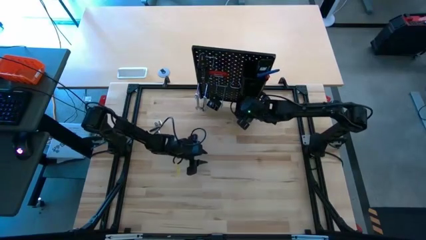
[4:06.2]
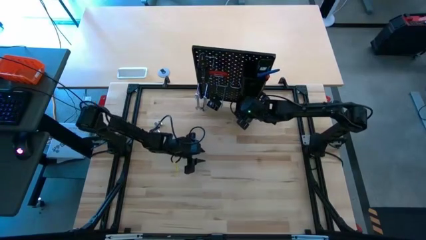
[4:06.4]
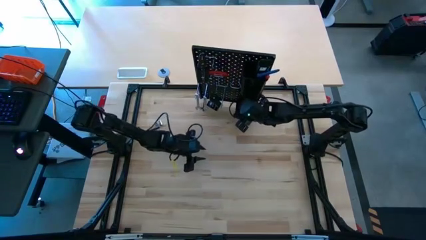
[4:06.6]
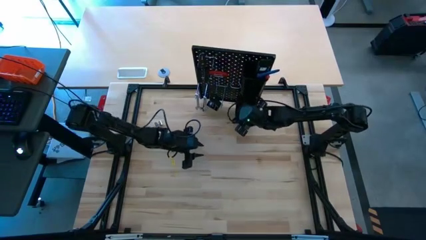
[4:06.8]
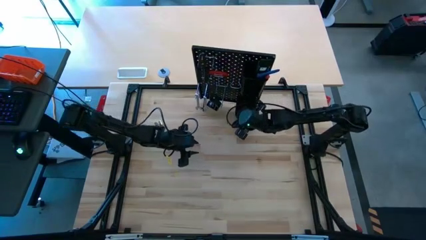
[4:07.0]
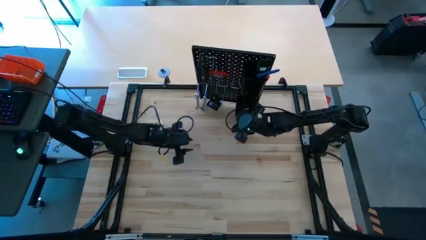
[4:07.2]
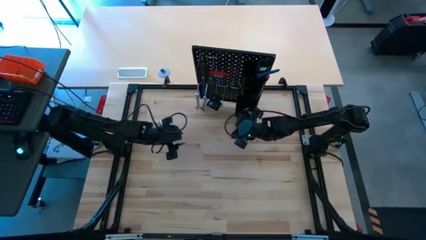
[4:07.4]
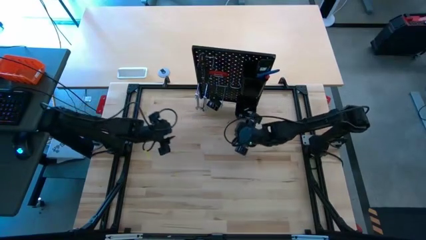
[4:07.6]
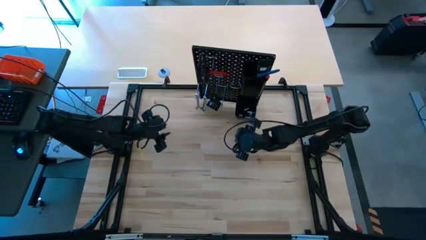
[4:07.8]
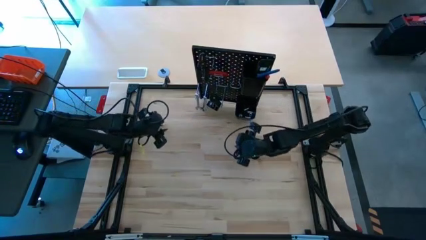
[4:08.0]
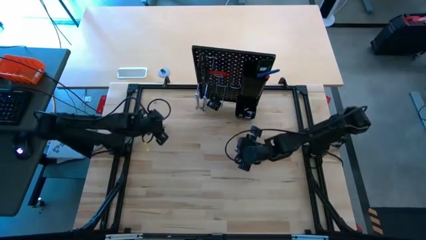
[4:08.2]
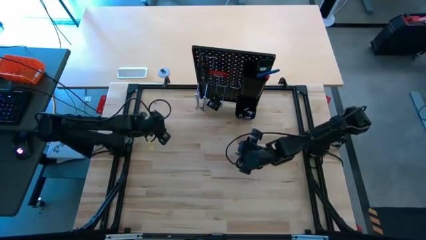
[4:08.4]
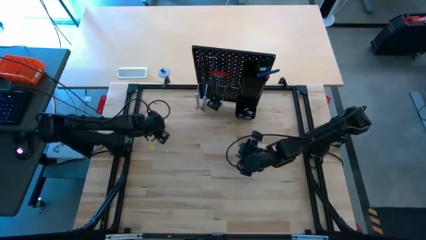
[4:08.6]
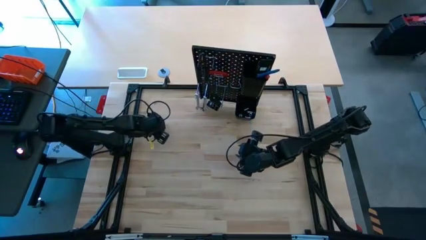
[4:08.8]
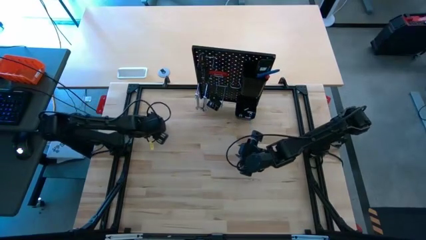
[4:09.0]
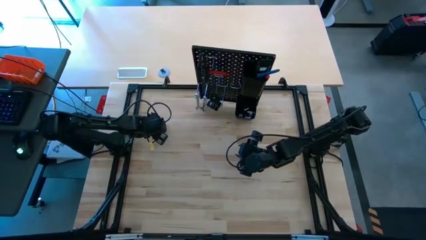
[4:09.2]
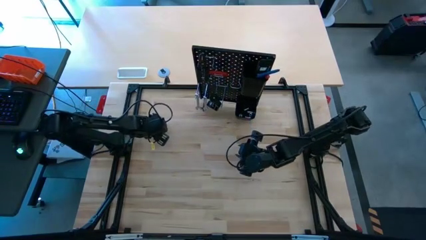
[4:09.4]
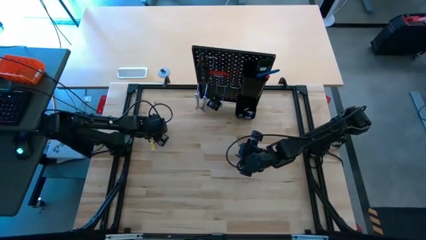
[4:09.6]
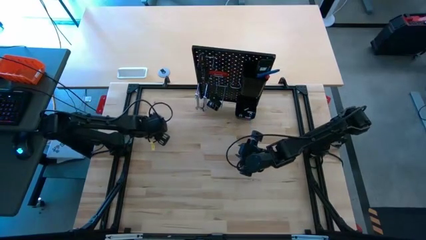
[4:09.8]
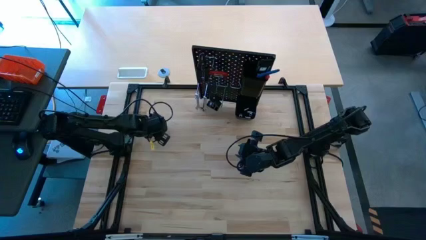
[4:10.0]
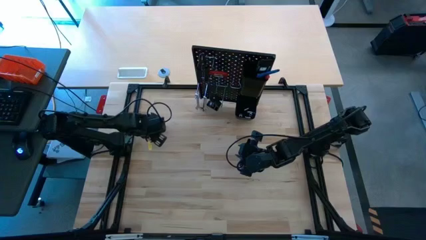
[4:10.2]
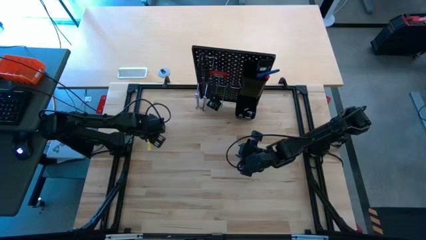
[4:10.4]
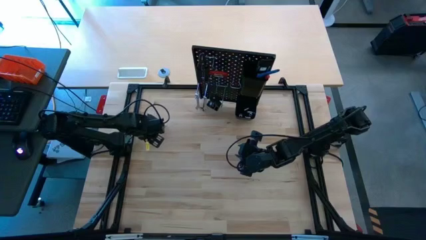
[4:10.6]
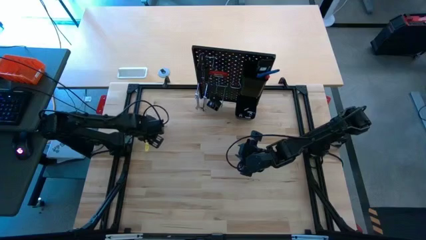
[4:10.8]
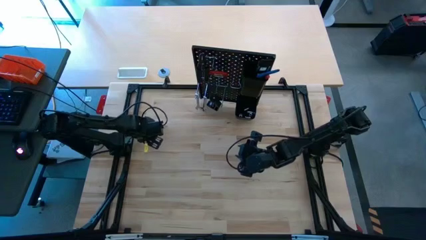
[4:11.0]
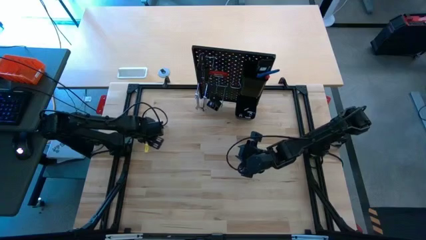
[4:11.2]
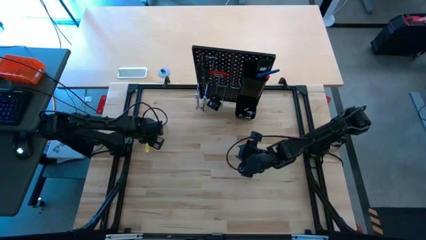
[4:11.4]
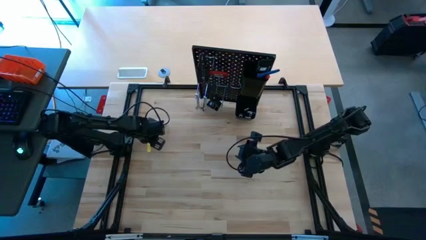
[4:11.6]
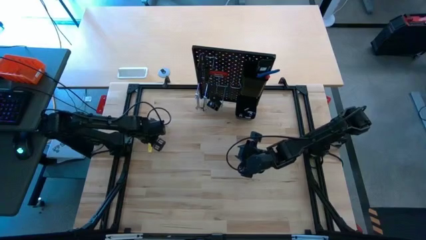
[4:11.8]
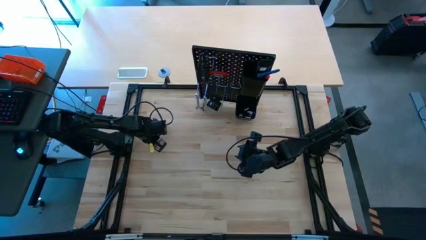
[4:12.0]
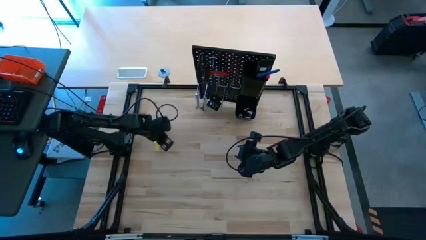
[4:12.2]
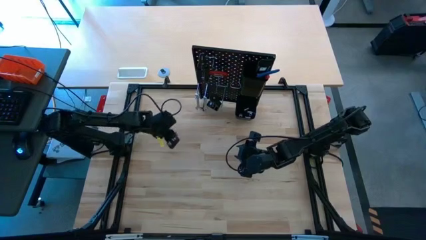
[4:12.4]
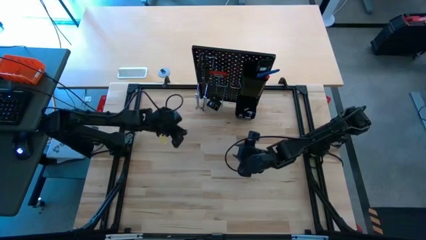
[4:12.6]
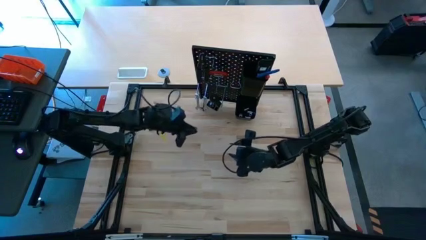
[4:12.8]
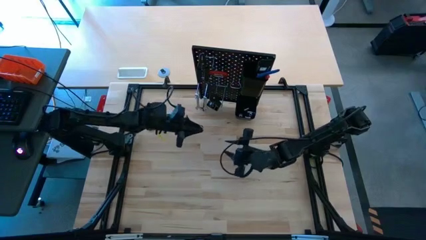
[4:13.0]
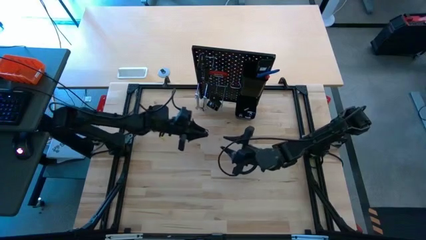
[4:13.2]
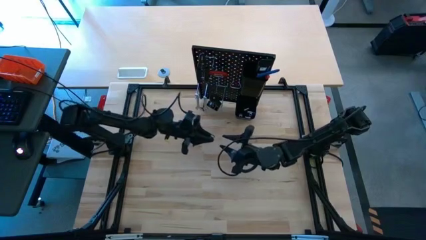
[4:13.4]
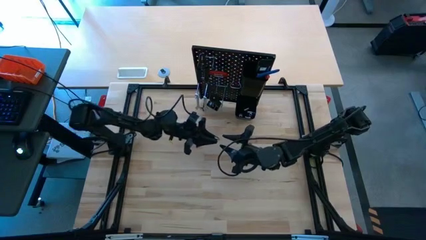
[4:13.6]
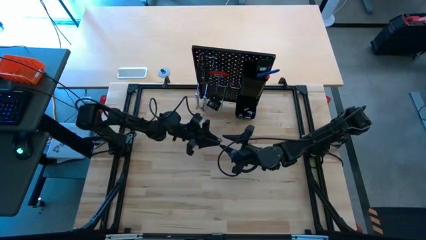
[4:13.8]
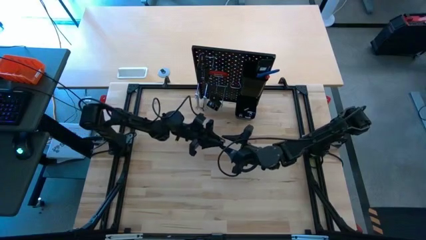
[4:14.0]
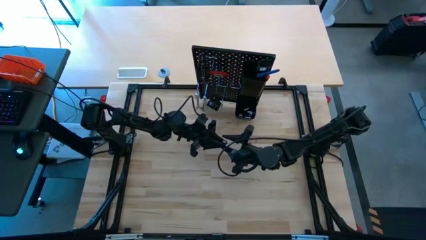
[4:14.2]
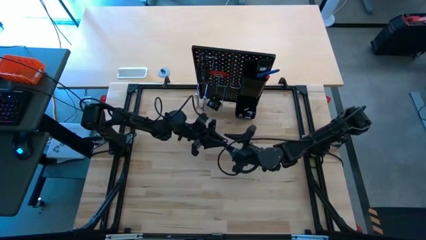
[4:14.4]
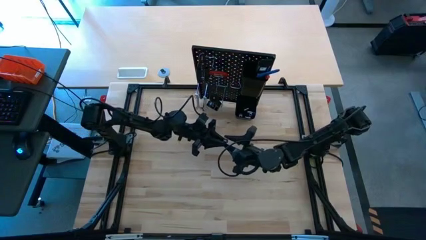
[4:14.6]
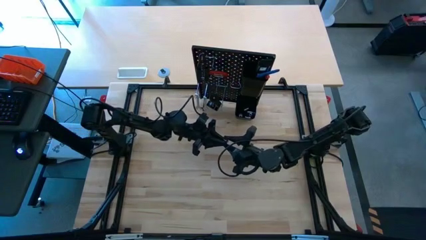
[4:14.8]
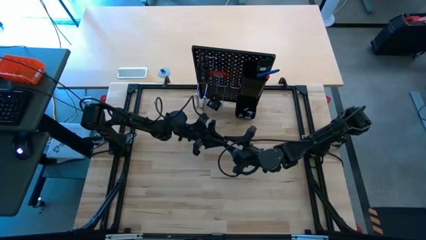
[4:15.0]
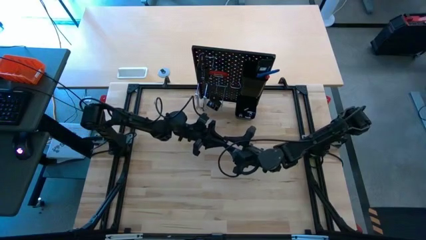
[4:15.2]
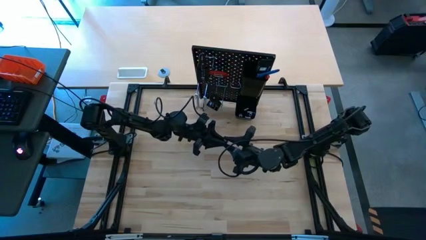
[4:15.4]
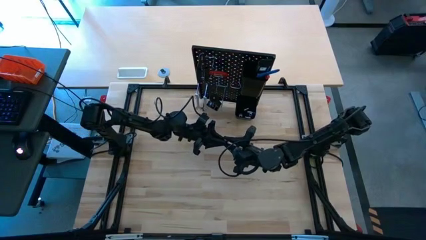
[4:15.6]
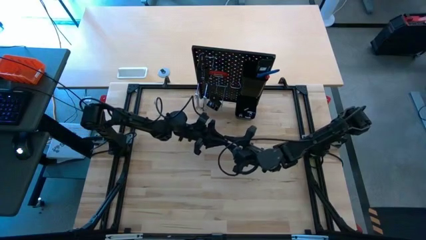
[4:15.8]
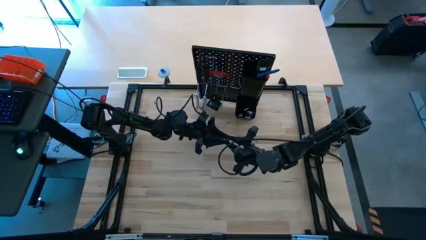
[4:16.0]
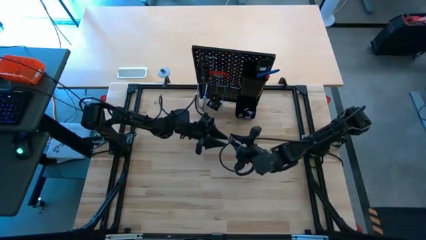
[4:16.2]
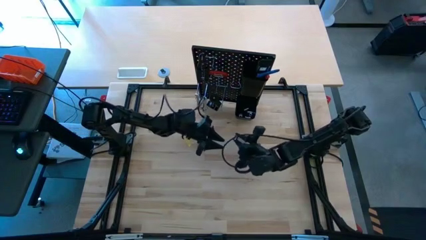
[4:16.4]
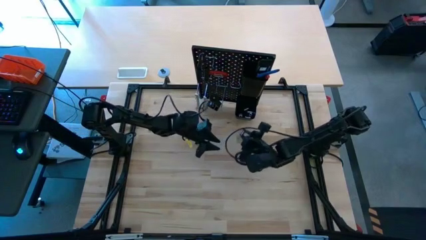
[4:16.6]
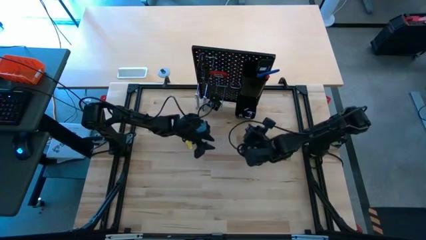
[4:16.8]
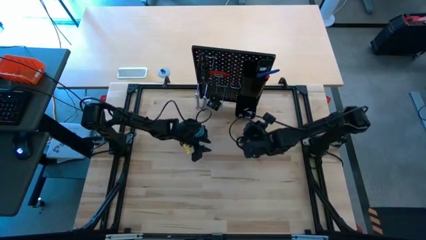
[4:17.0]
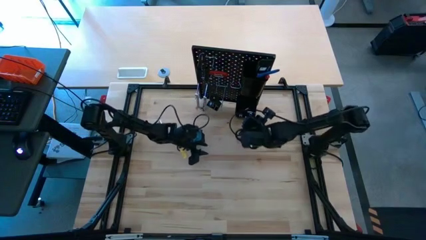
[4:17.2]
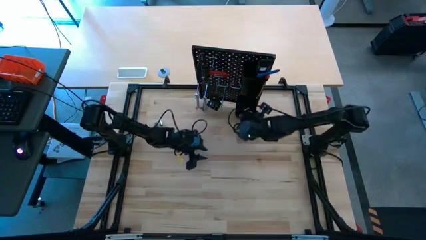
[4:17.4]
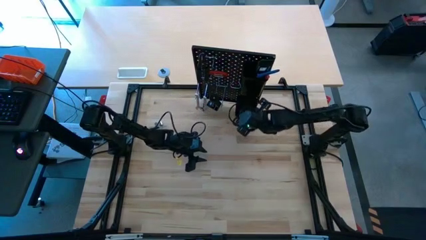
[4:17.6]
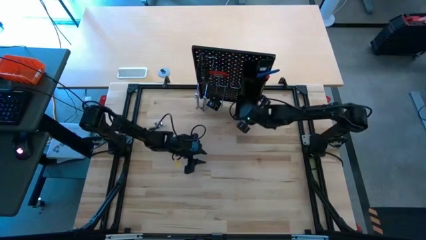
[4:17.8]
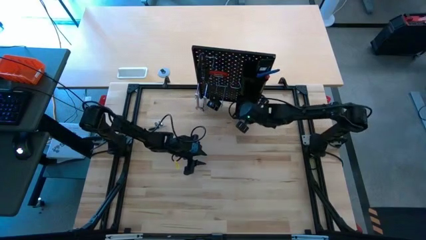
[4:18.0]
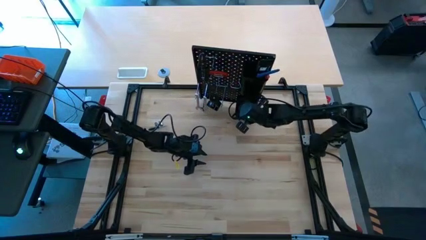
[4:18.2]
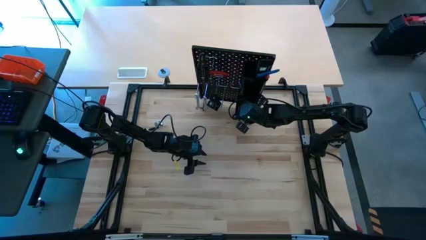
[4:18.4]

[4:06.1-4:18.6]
Task: Hang tools onto peg board
Put the socket into the bottom black bin on the peg board

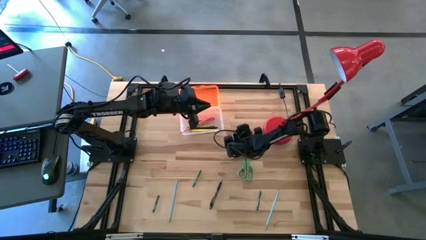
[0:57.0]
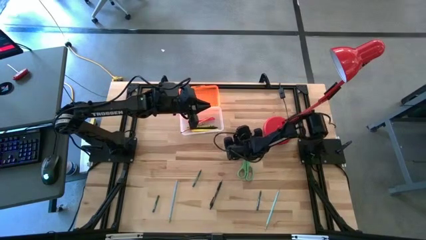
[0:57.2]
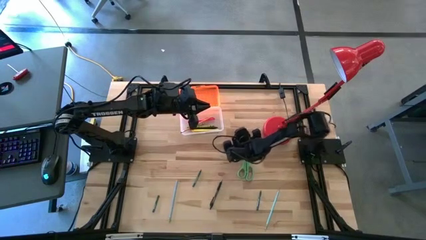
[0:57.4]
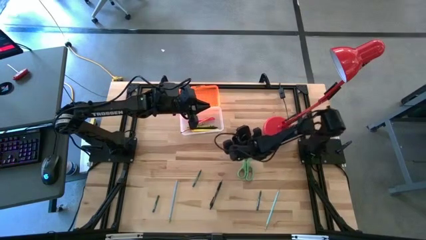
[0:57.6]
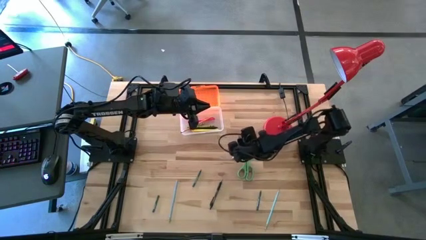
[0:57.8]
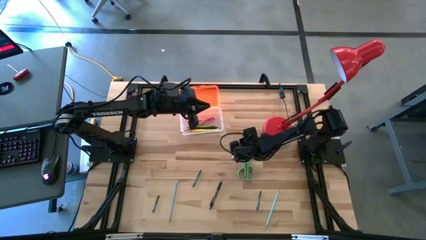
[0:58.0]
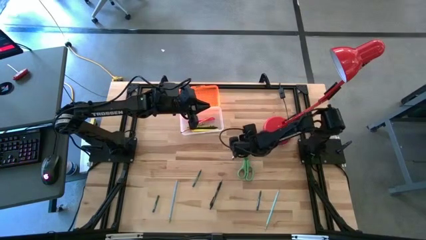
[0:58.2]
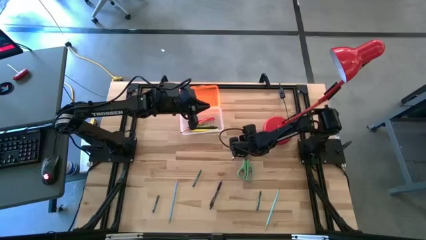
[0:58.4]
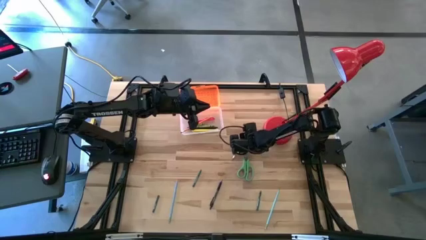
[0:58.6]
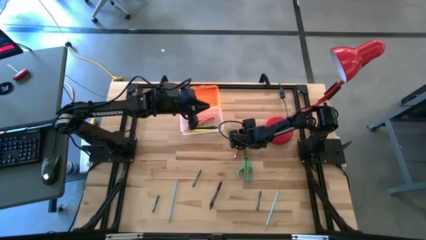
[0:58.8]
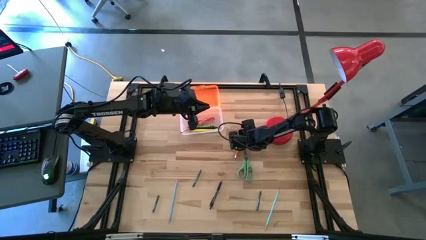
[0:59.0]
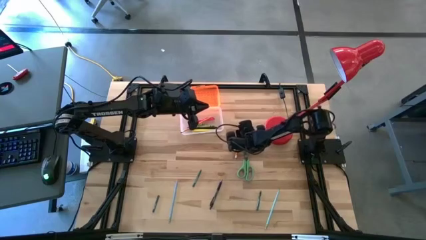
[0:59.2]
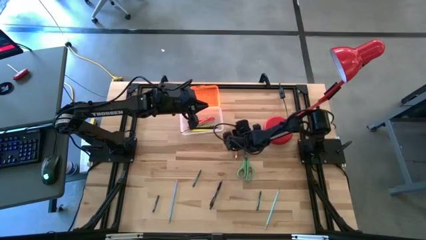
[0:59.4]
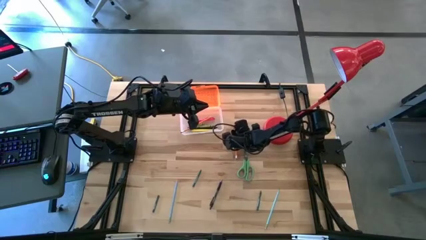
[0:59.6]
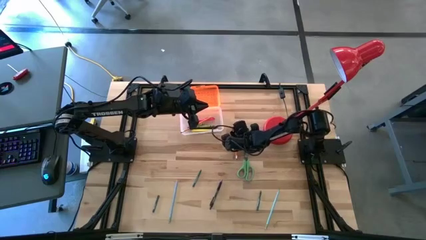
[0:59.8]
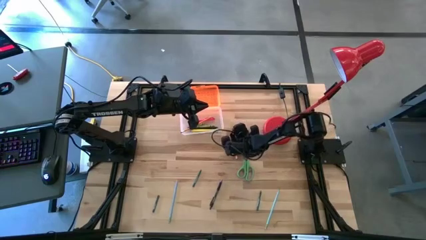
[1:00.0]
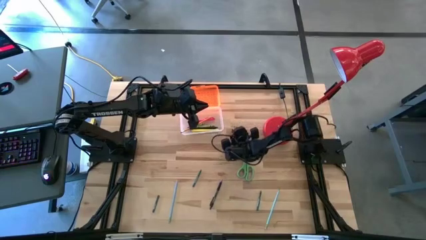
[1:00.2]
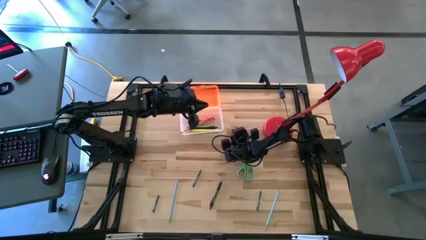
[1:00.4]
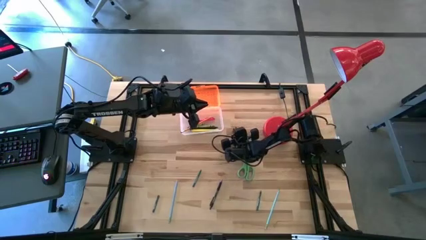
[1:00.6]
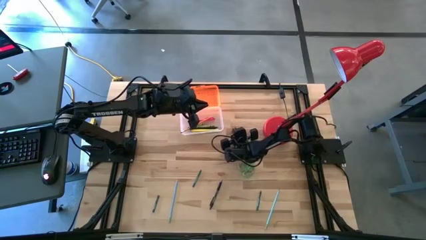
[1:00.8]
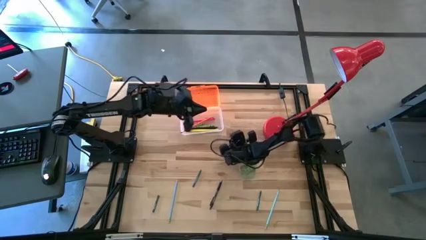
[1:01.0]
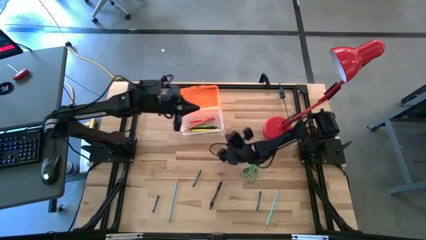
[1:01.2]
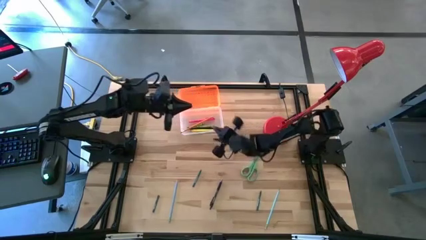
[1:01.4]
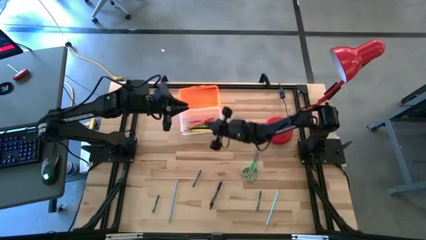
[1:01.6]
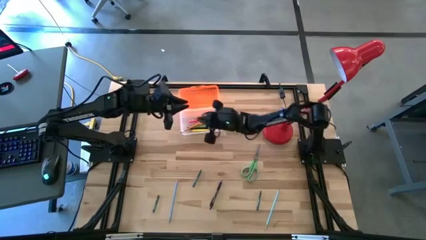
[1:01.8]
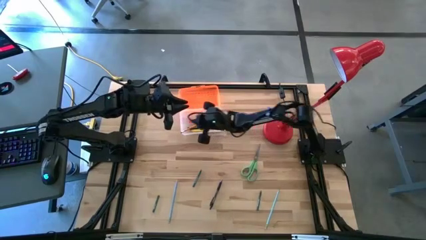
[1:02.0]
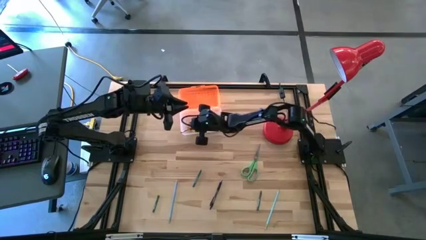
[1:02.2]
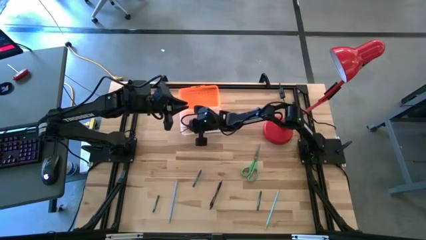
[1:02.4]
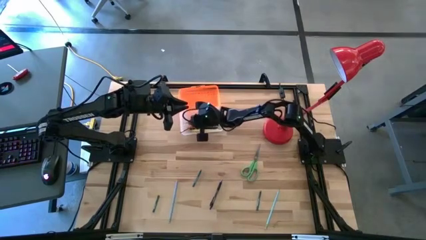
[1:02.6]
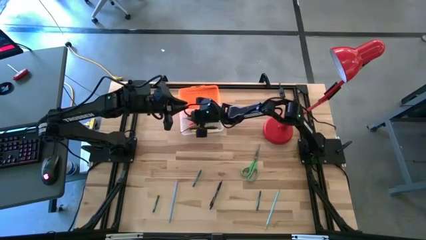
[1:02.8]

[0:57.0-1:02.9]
Task: Pick & place school supplies into a supply box
Put the orange pencil into the orange supply box
